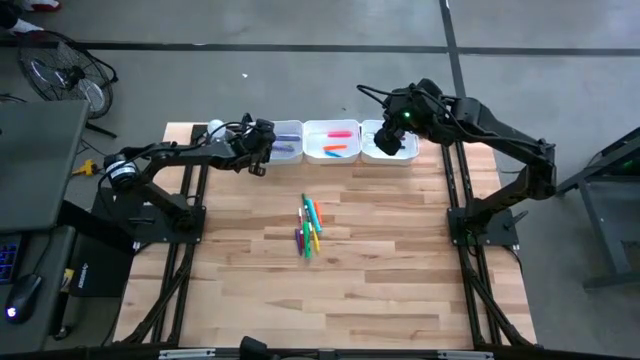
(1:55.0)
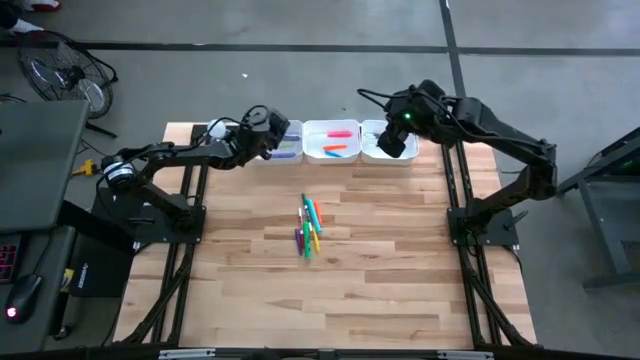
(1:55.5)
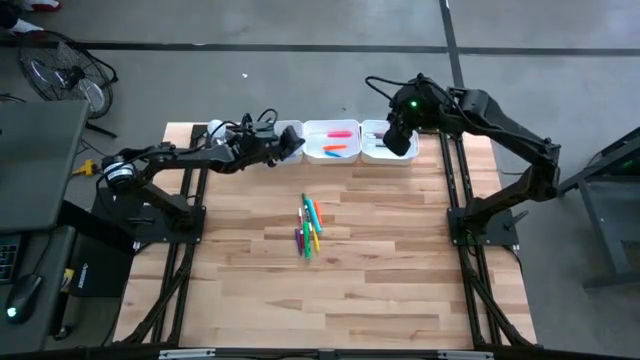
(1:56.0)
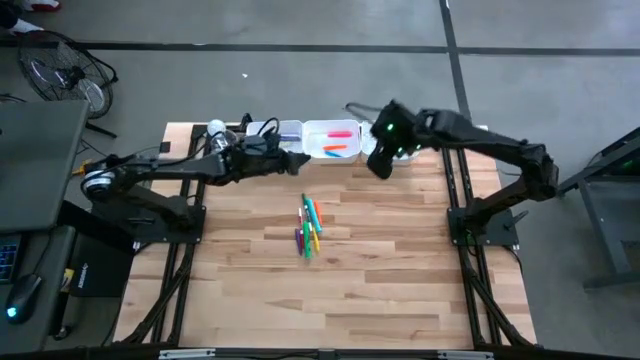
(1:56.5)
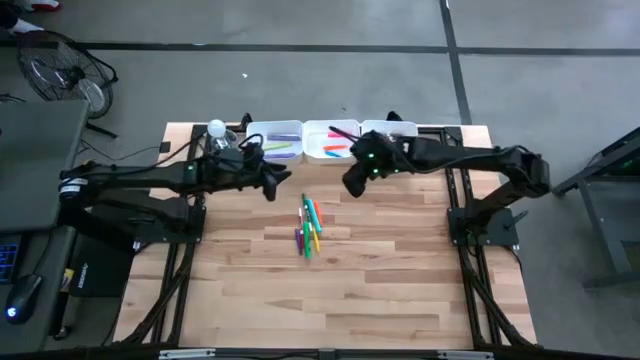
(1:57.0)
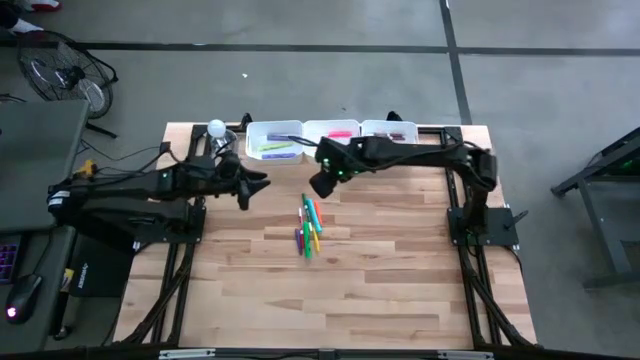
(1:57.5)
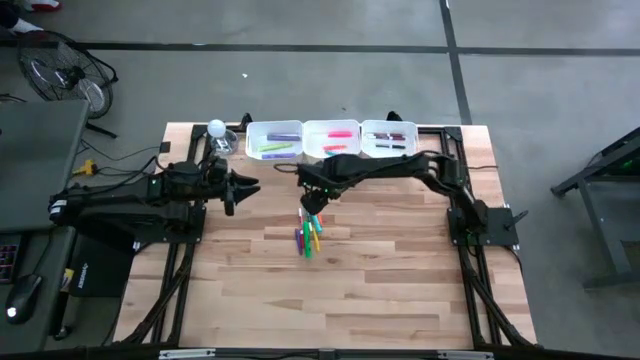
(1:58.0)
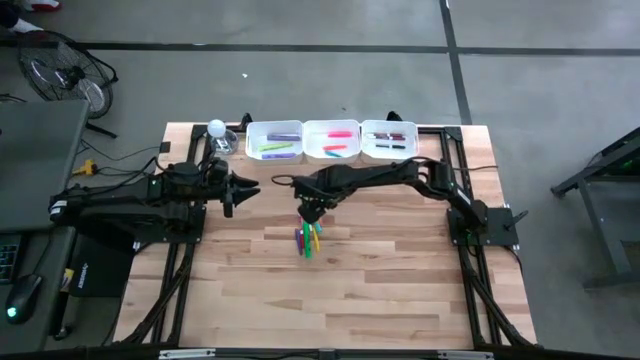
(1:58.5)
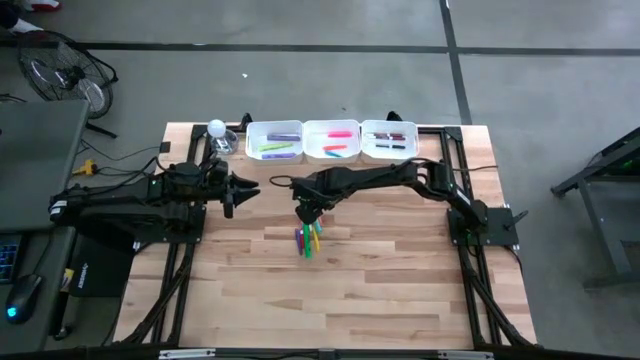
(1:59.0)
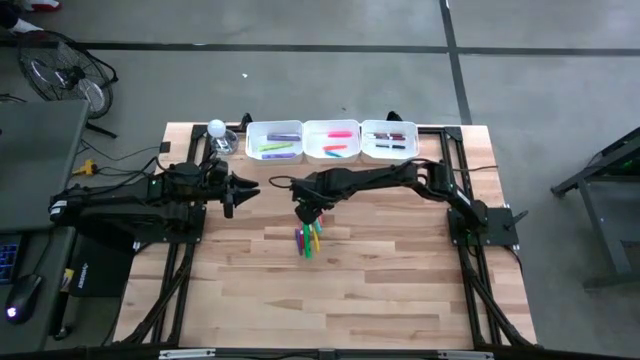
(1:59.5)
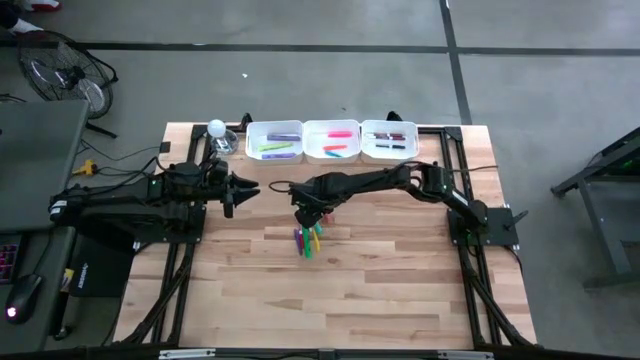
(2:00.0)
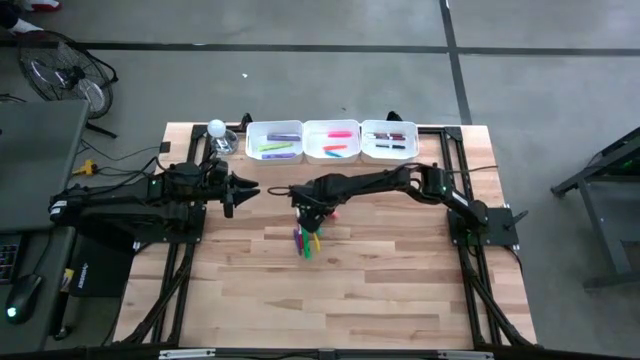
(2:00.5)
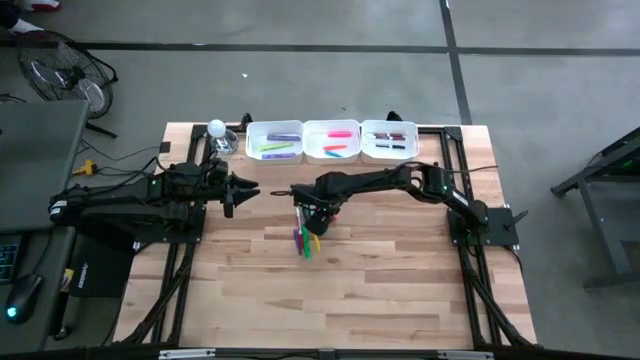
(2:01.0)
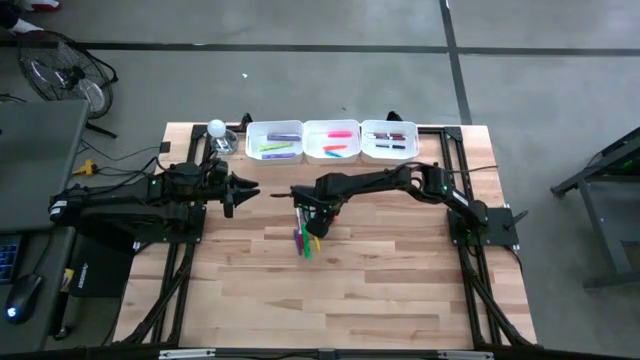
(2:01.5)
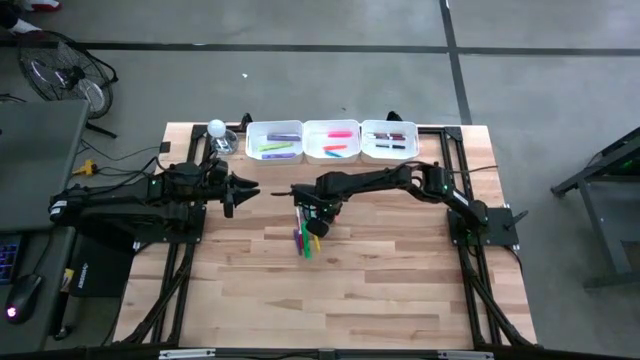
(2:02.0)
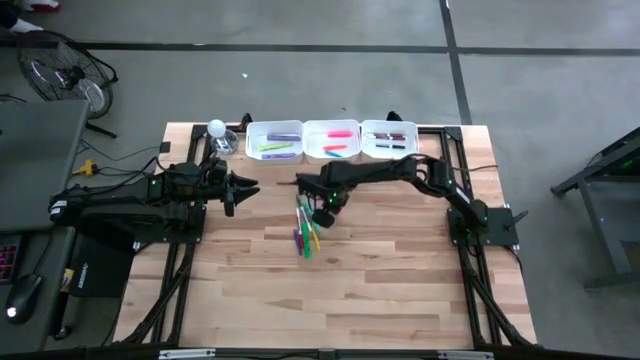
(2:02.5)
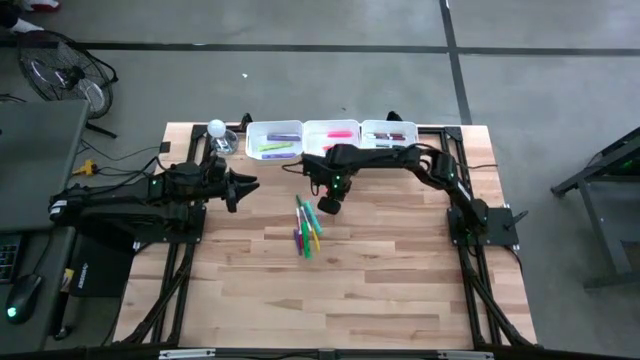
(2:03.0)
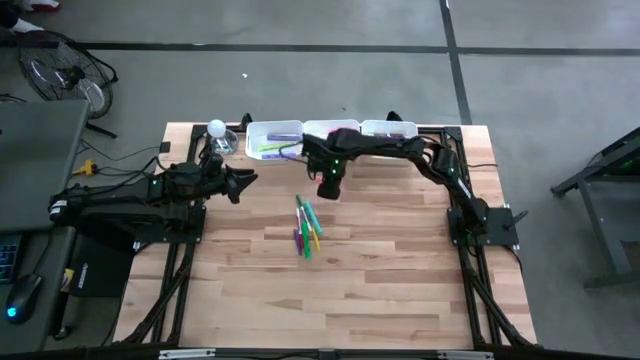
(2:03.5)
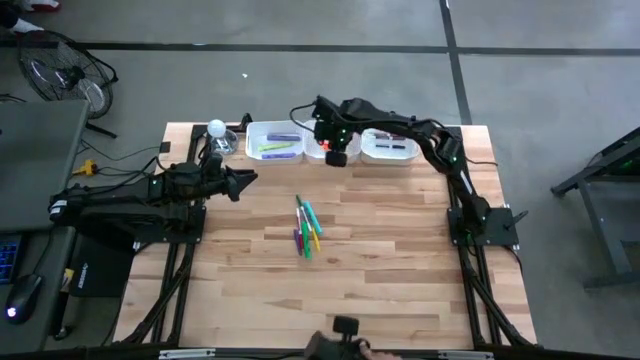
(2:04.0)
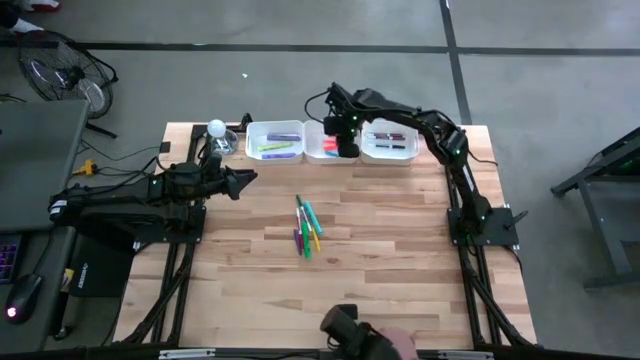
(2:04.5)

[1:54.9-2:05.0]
Task: Pick & Place Markers
Put the orange pen into the middle white bin

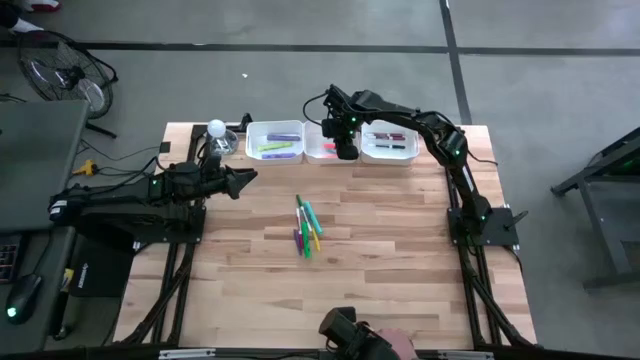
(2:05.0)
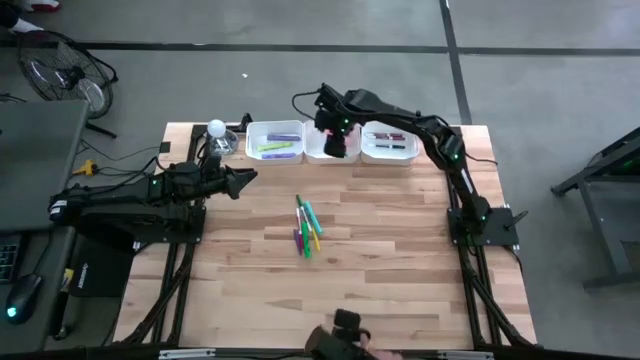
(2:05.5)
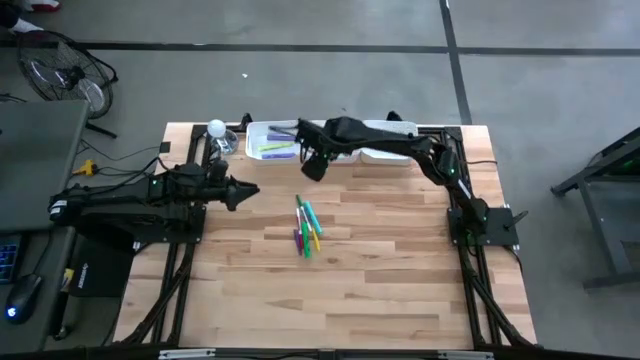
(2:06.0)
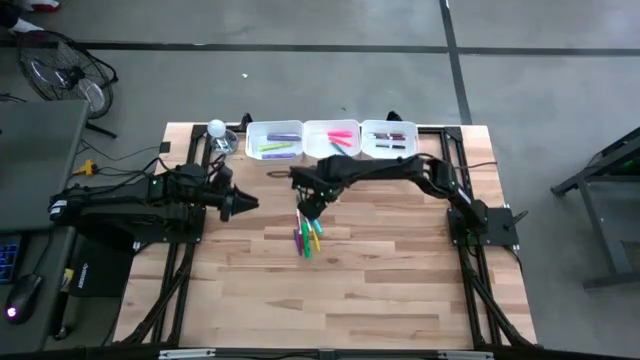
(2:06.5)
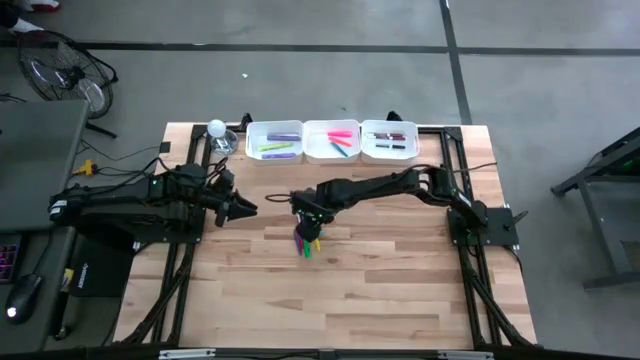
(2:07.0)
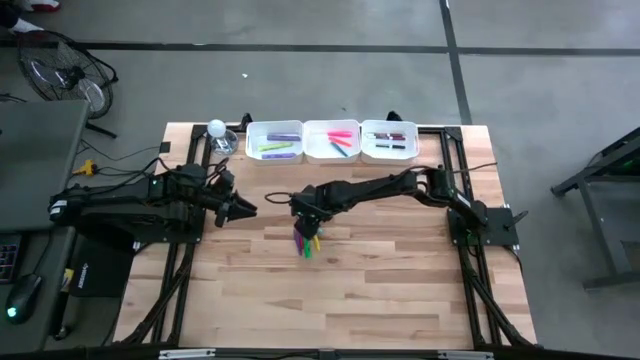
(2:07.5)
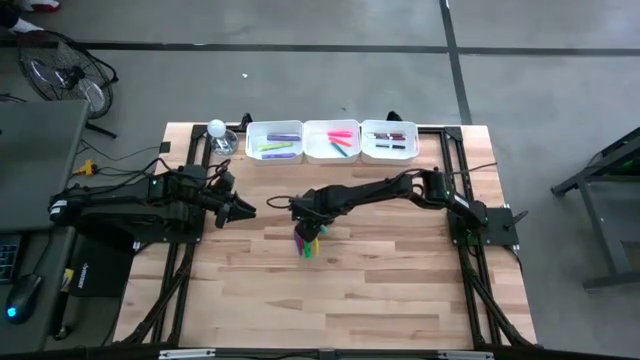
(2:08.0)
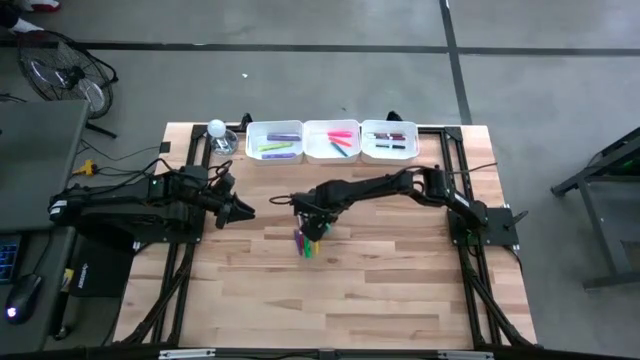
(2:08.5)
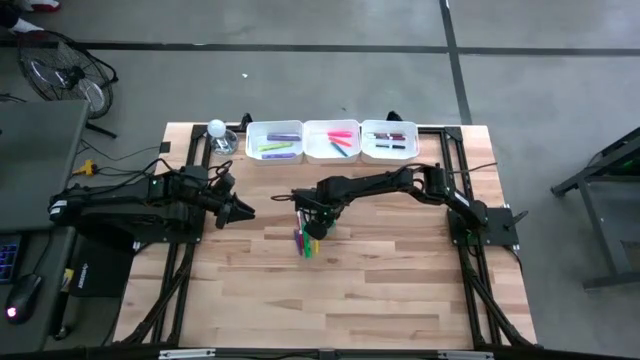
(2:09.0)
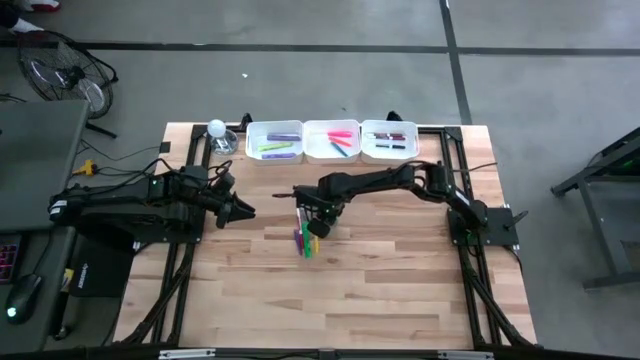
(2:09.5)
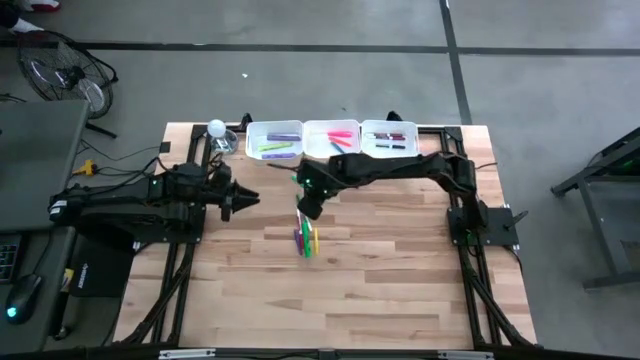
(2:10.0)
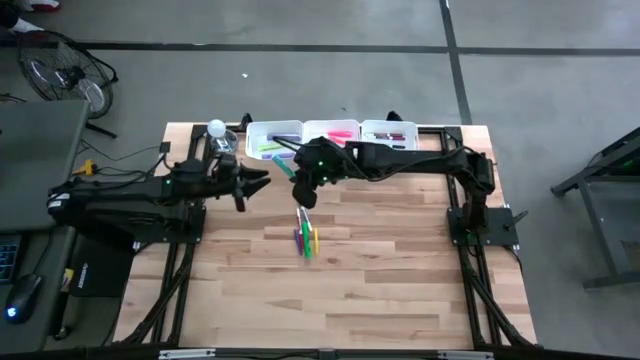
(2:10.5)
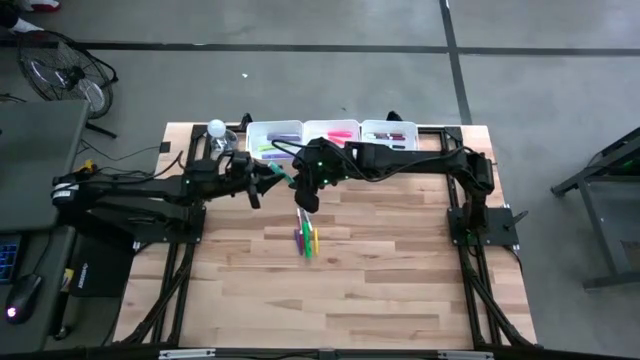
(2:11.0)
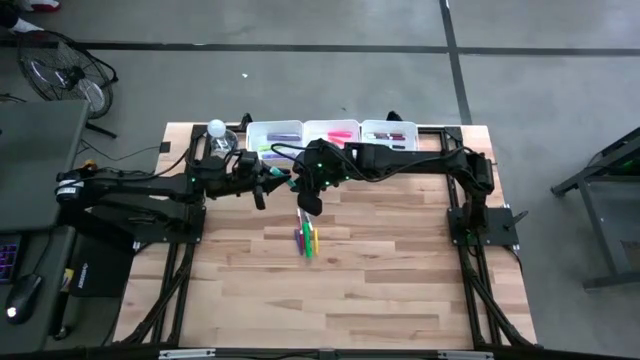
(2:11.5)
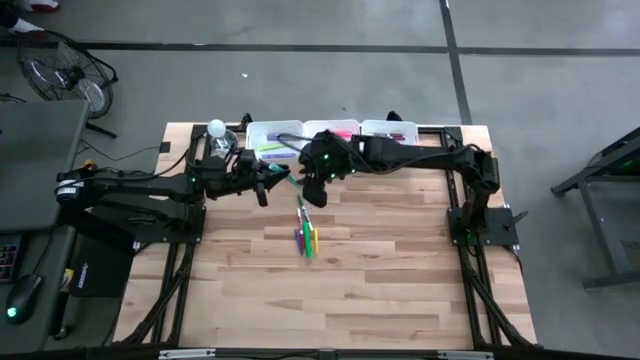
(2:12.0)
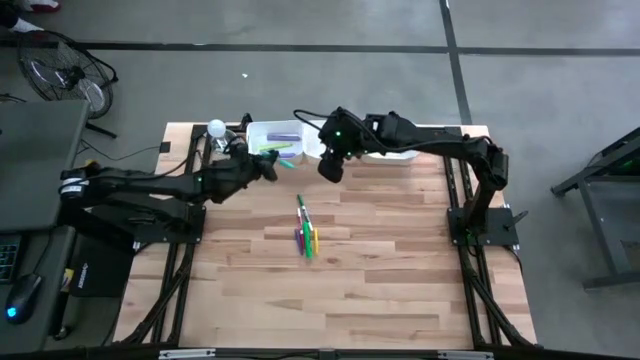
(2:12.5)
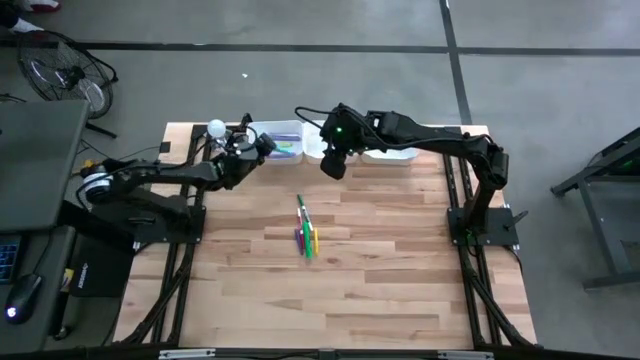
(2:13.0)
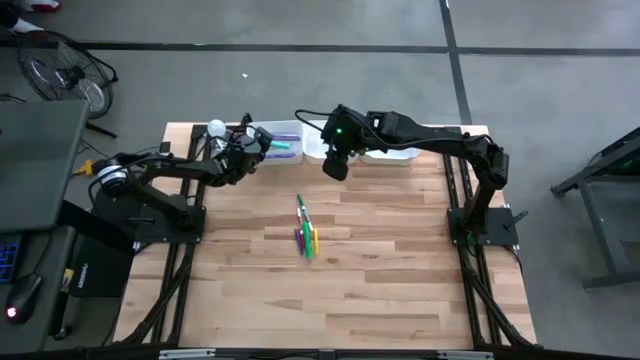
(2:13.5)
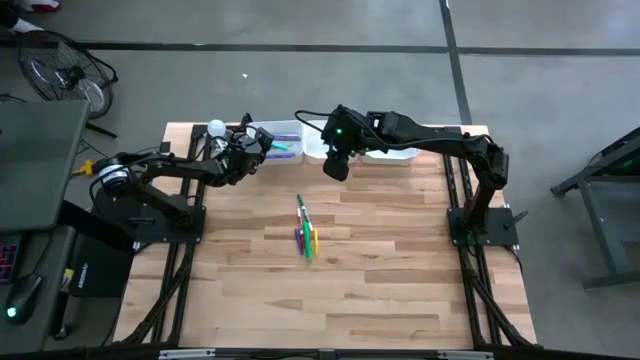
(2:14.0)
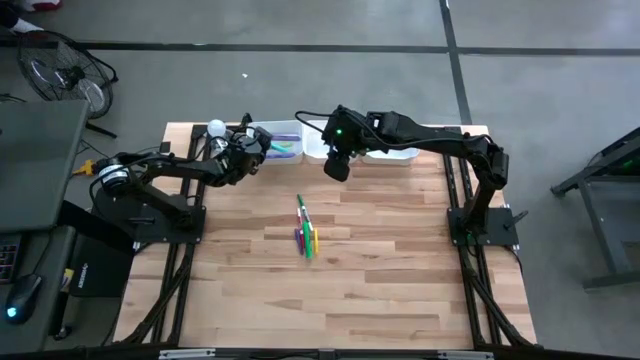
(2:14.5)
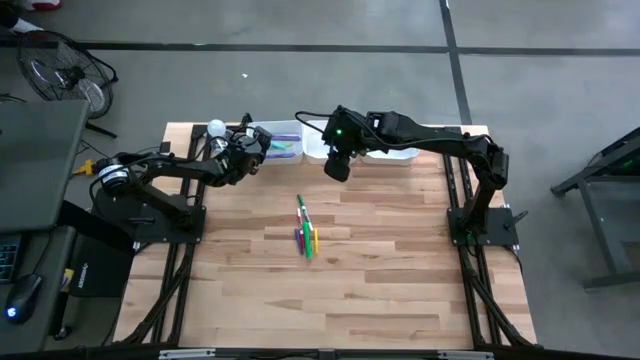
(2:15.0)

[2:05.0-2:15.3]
Put the light blue highlighter pen into the left white bin

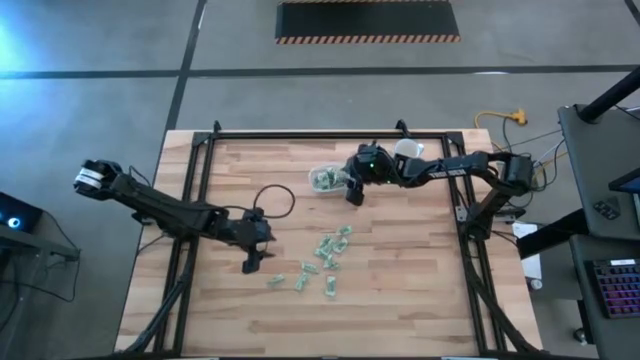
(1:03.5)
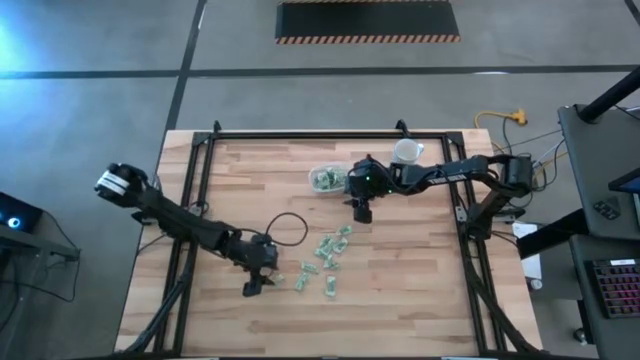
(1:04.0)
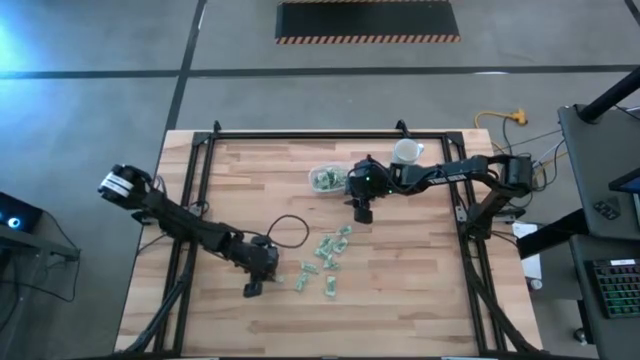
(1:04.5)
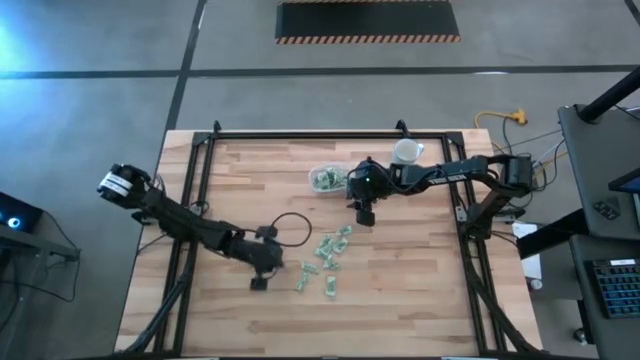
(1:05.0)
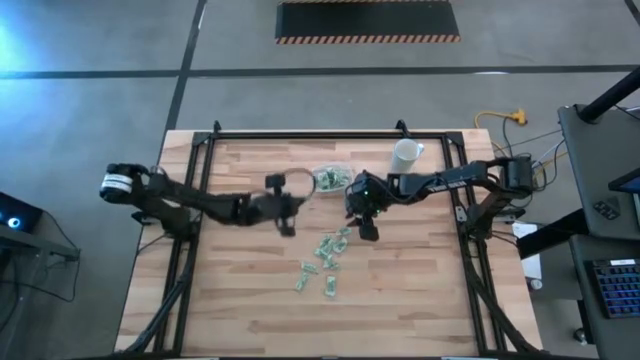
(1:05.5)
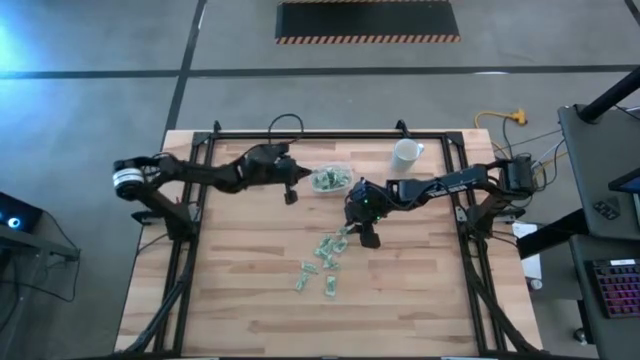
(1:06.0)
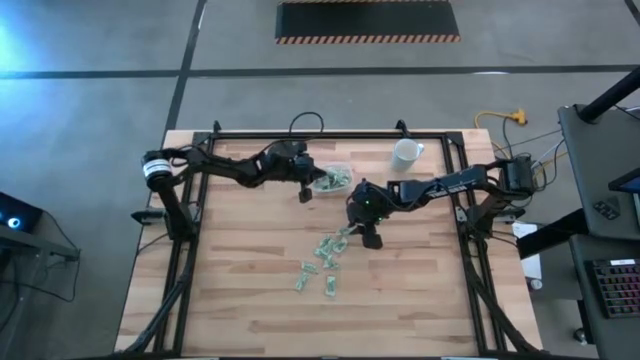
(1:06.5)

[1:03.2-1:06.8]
Task: Pick and place Stevia / Truvia into bins
Put the stevia packet into the transparent container
